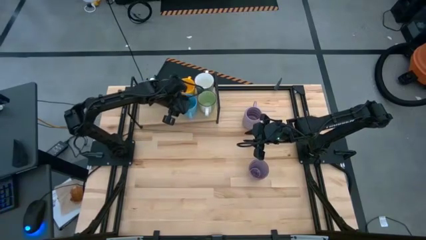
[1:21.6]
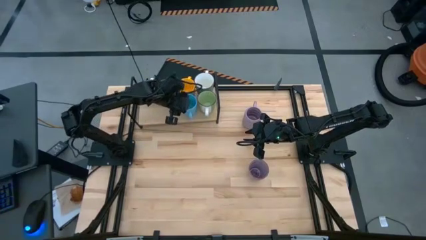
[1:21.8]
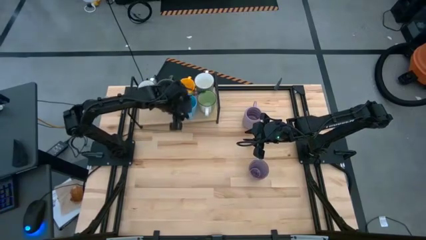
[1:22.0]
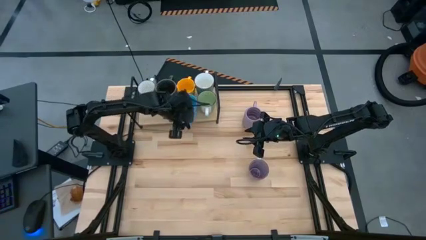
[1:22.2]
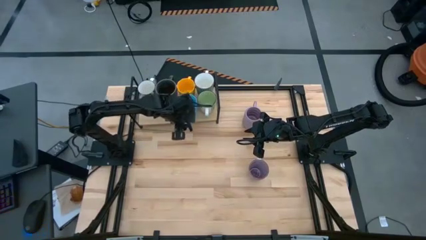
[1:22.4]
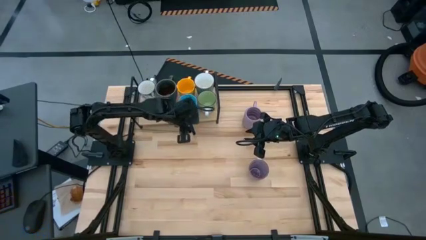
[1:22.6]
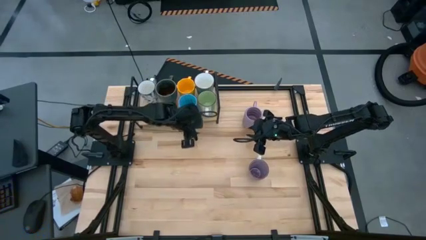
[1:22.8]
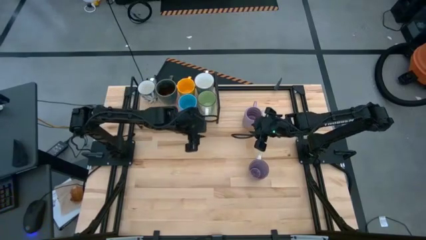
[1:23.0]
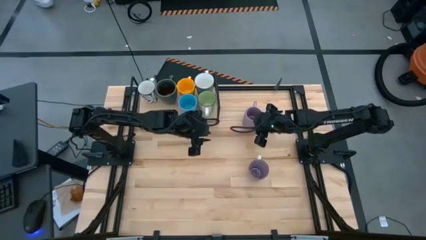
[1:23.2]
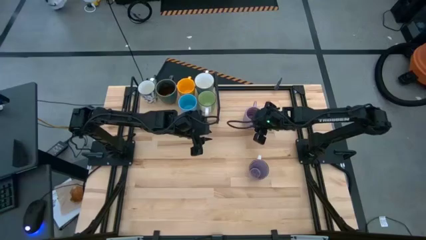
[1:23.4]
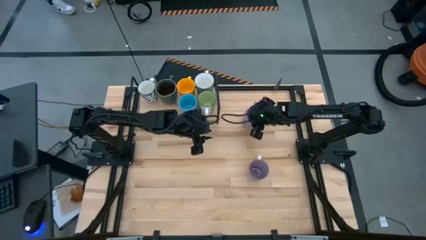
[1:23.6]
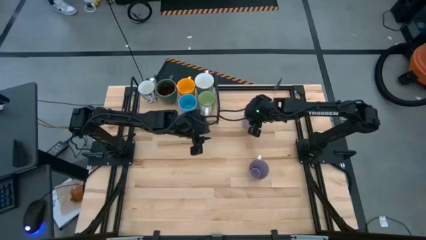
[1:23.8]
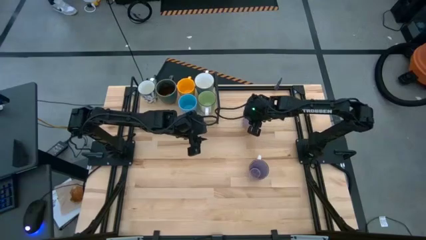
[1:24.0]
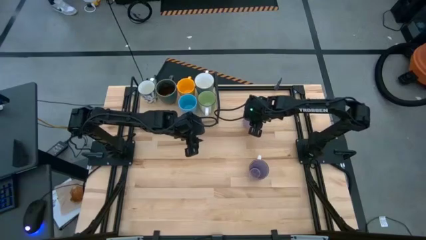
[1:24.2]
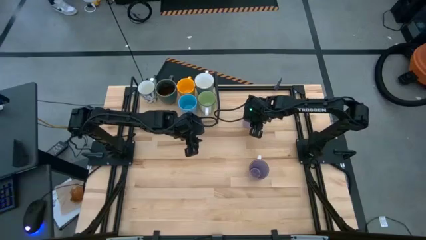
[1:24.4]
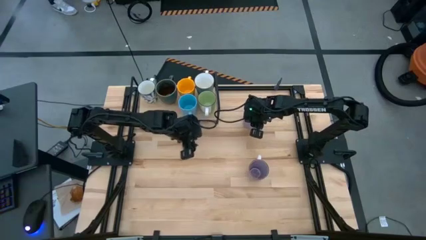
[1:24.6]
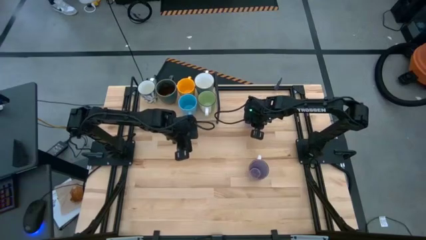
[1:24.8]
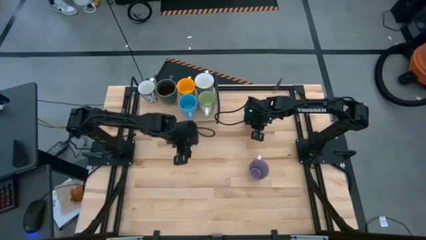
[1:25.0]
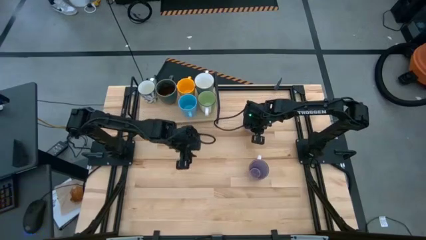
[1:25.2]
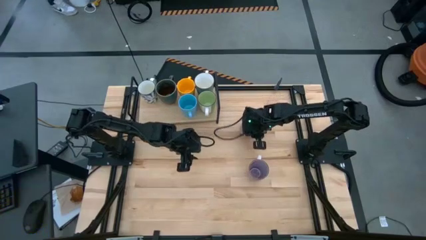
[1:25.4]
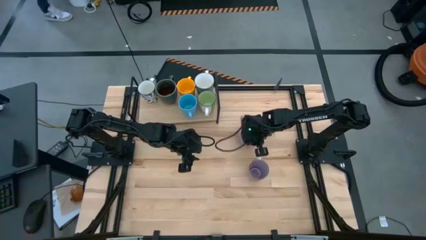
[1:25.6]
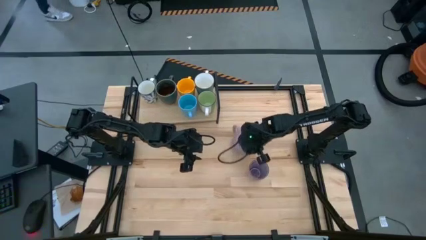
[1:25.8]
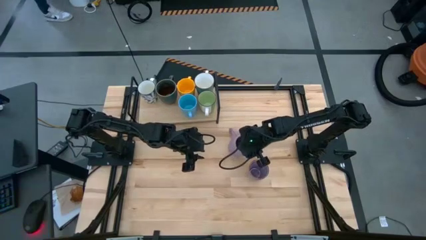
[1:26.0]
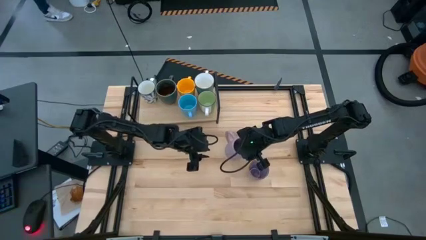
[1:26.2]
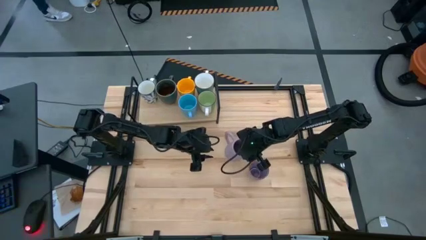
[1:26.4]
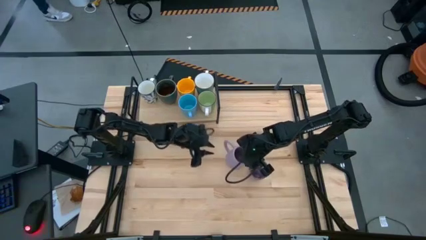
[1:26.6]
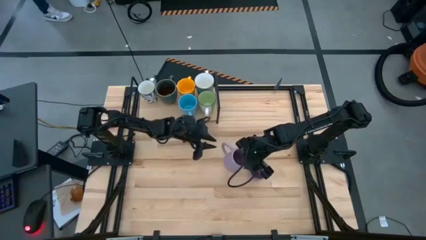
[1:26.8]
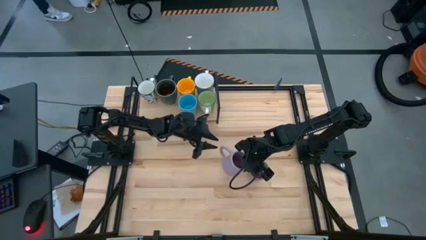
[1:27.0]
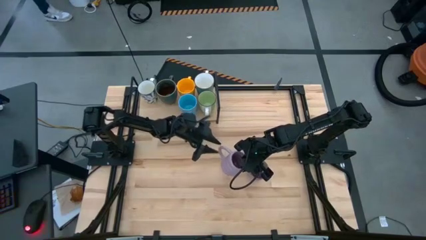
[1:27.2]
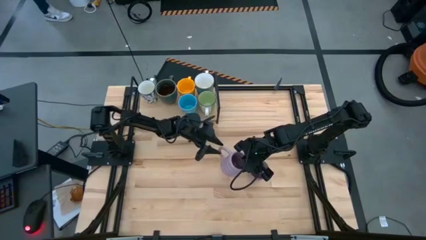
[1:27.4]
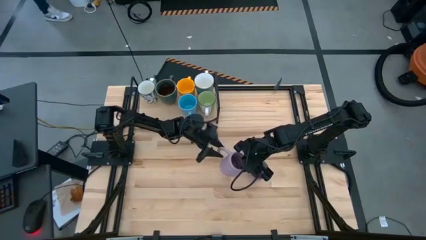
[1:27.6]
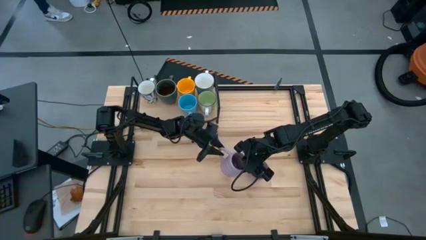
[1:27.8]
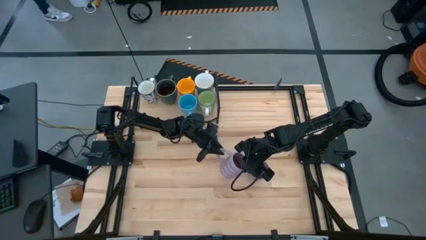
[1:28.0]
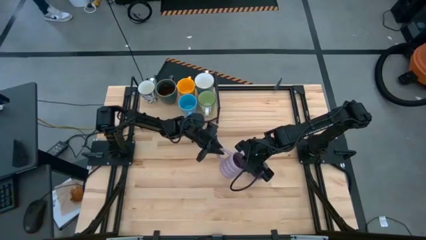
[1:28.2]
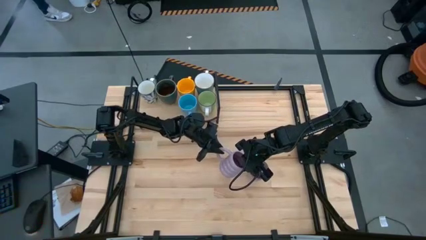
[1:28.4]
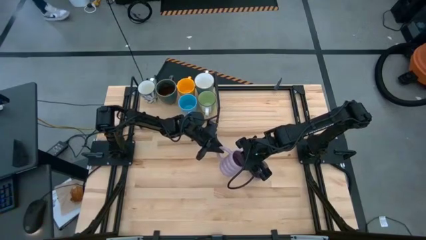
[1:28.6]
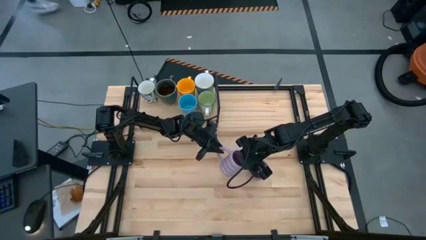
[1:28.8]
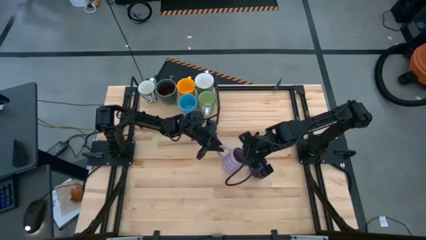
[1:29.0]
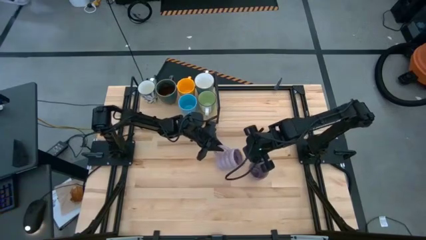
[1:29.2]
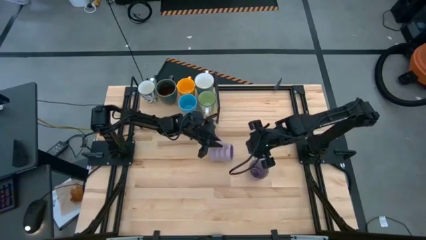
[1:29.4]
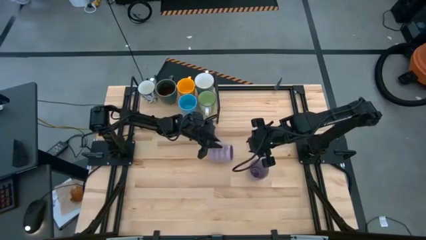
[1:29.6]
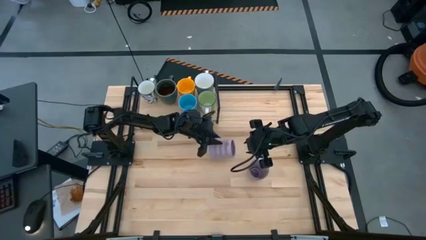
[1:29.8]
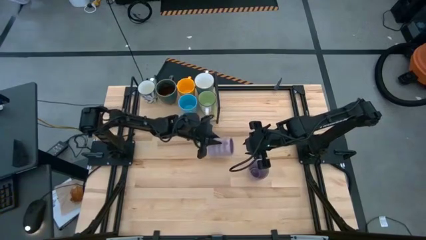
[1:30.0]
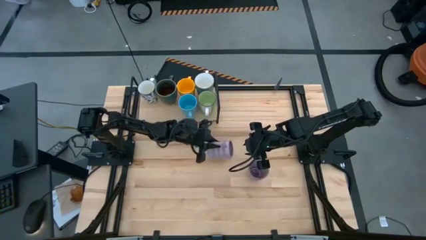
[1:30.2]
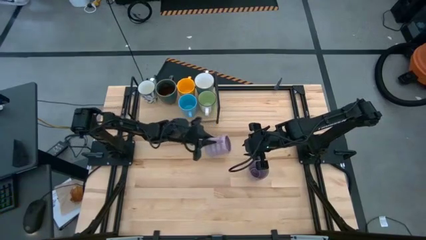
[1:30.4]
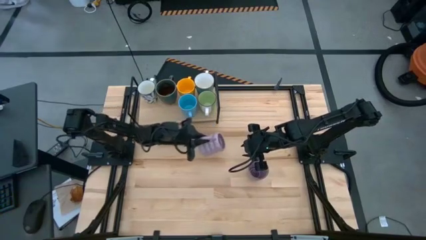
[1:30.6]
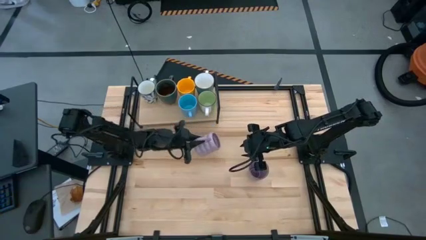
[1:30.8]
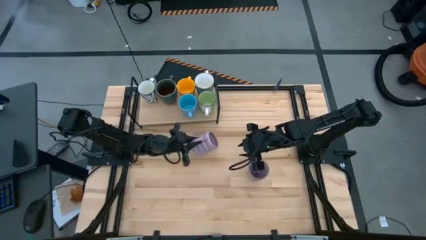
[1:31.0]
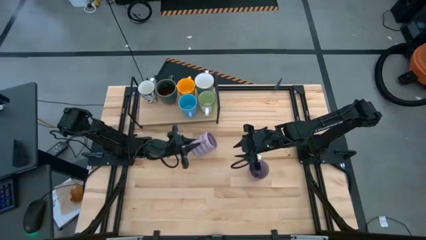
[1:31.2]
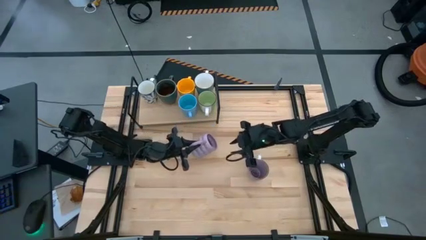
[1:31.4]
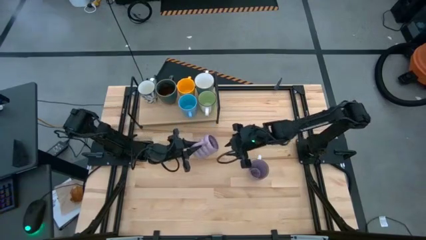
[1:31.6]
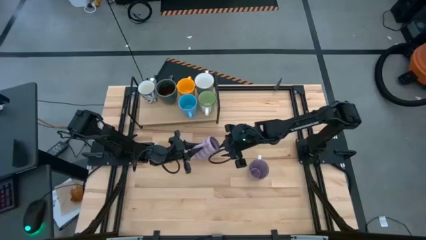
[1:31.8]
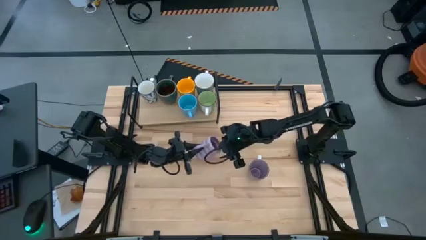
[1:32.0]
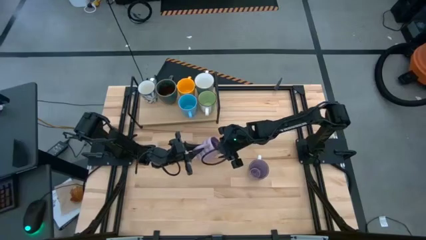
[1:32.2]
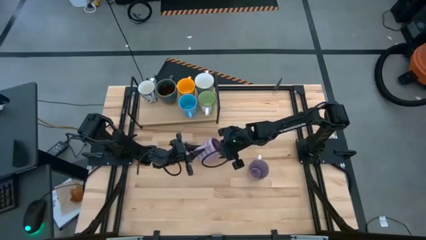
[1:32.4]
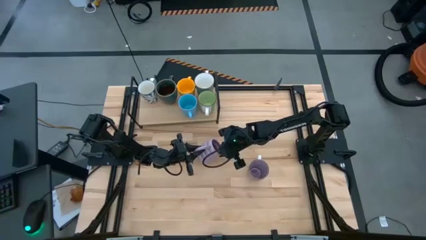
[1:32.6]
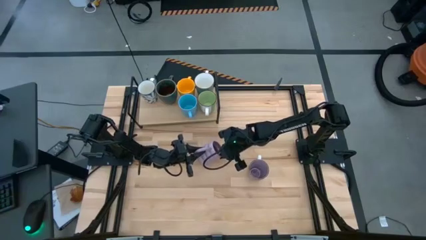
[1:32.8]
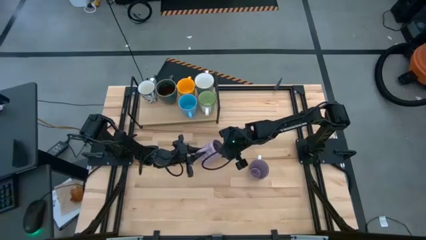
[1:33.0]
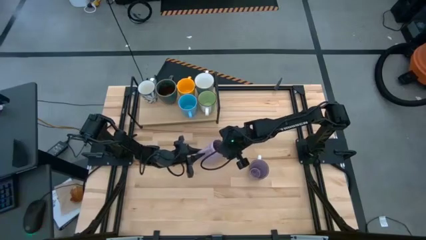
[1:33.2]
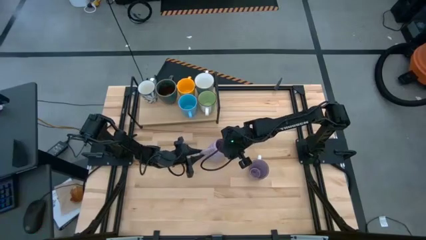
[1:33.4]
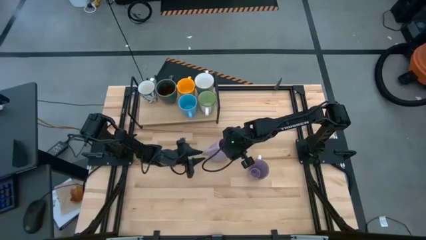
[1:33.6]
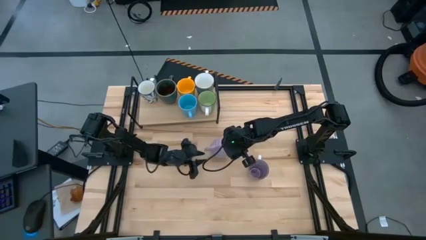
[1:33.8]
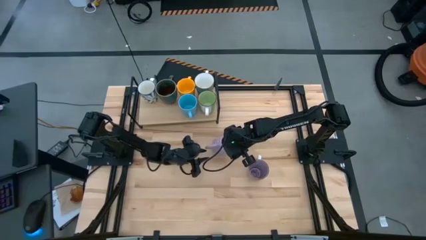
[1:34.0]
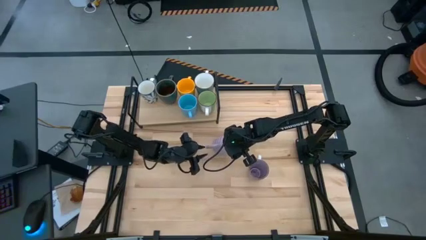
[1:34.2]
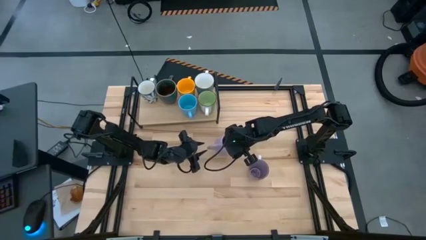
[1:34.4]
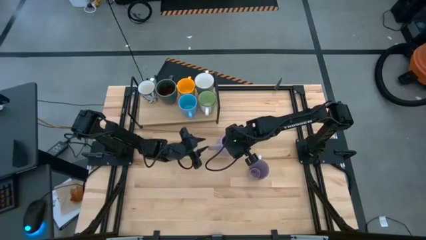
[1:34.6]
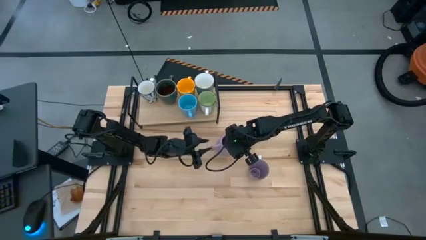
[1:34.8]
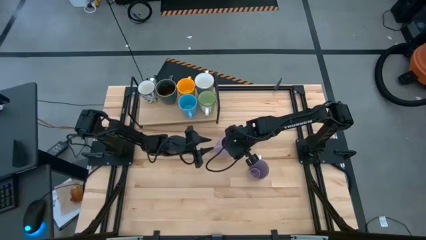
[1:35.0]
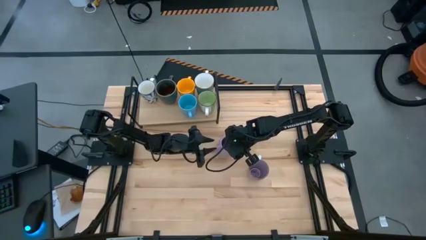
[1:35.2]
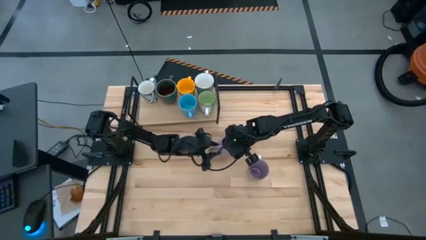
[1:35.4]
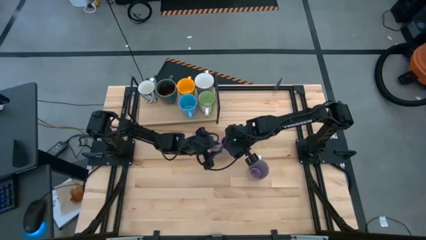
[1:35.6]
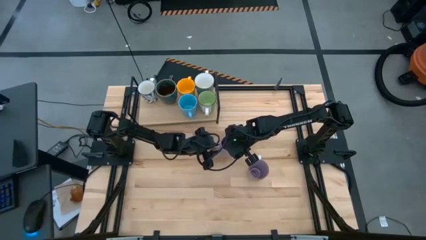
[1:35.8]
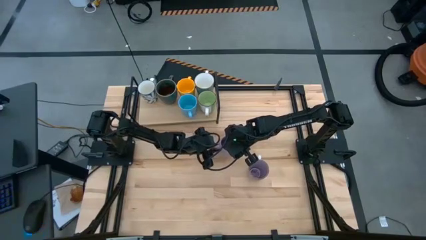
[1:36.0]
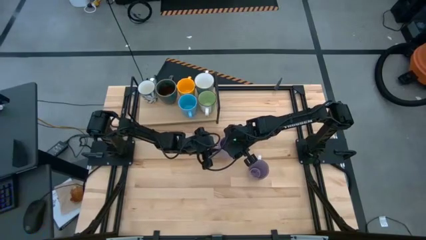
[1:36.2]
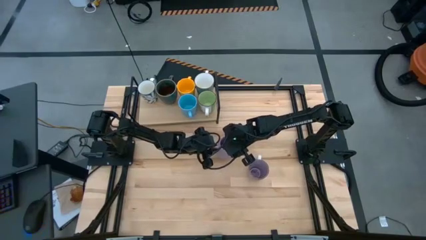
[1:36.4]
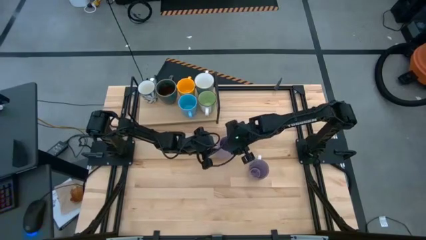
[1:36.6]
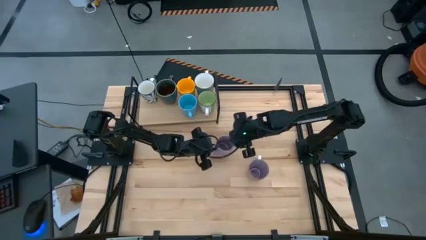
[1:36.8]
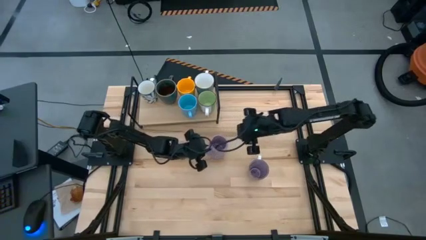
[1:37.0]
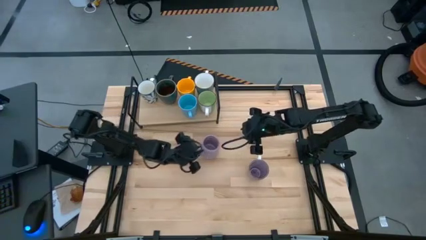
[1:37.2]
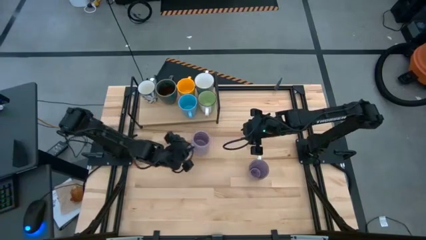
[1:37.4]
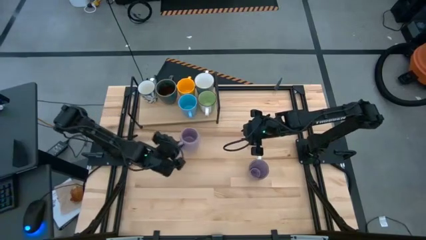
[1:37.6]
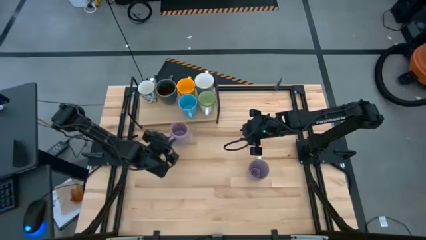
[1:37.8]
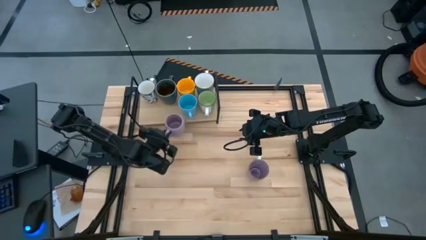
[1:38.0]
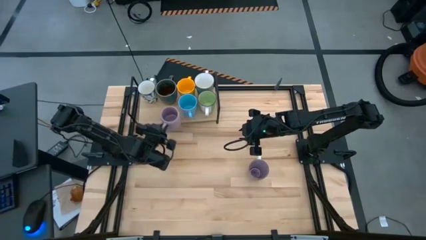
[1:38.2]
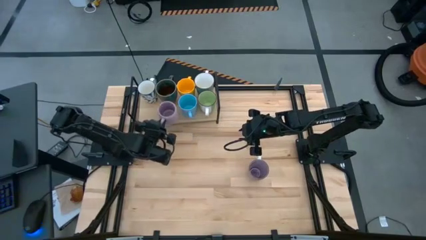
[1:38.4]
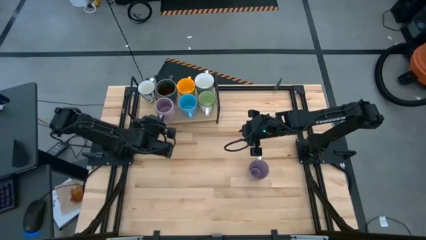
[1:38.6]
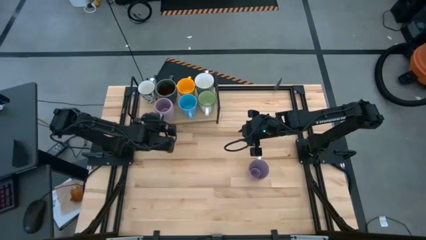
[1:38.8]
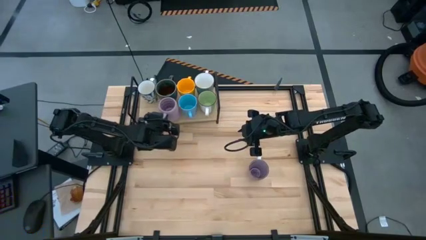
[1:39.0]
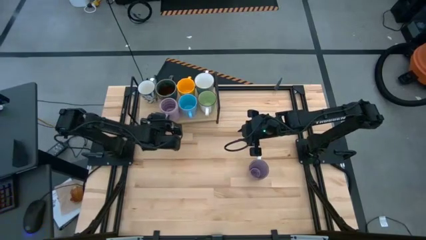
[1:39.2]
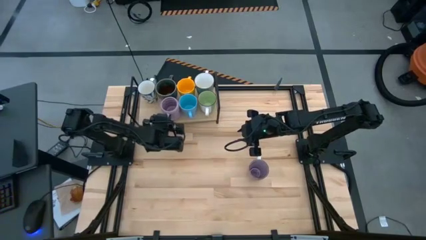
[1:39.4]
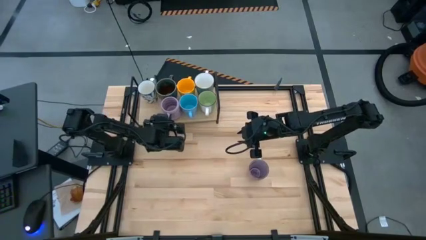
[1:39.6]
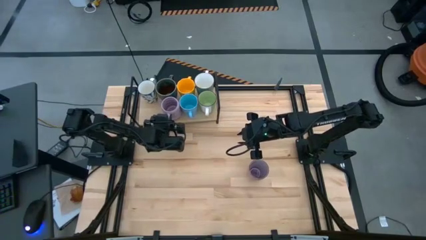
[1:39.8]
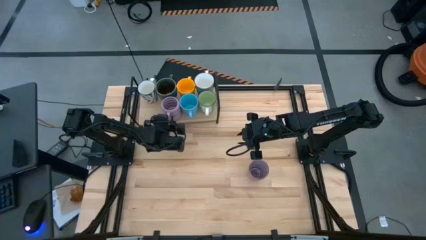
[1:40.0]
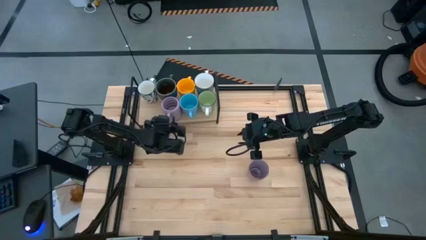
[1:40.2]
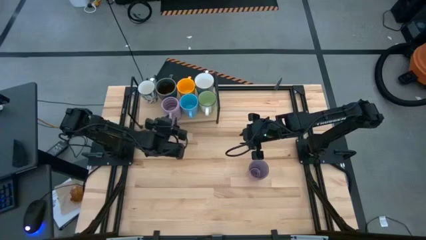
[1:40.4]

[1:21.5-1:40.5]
Task: Place coffee mugs
Put the purple mug on the shelf
